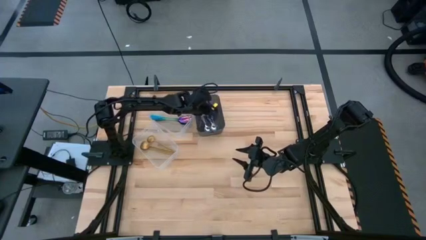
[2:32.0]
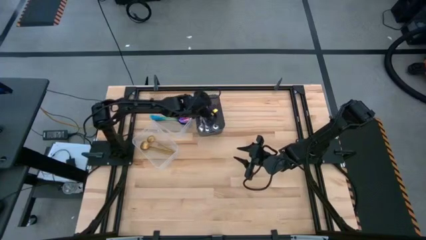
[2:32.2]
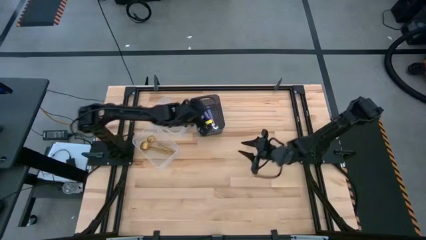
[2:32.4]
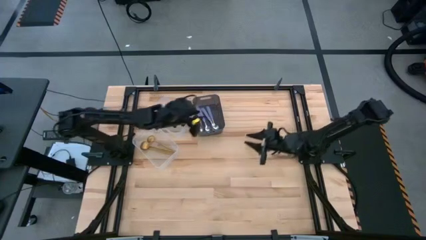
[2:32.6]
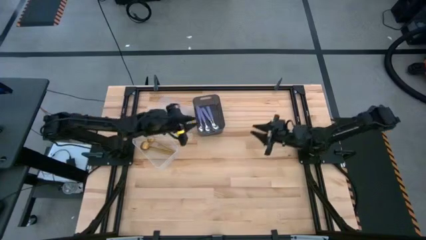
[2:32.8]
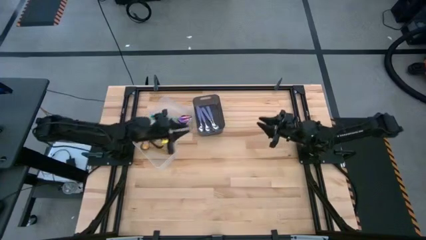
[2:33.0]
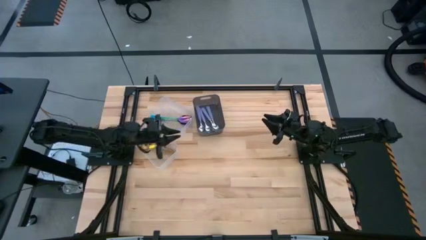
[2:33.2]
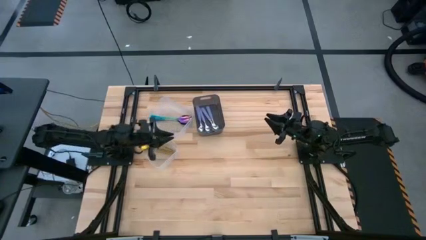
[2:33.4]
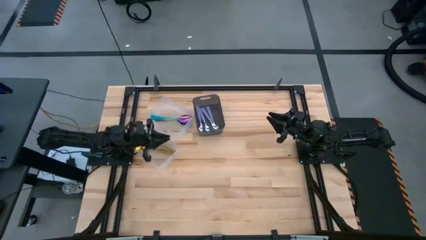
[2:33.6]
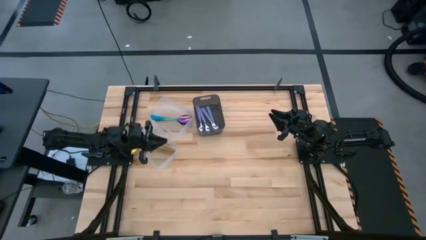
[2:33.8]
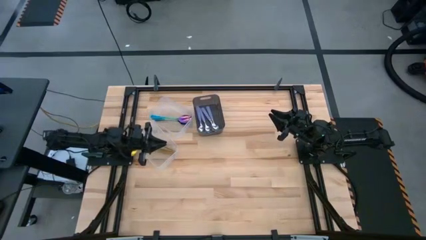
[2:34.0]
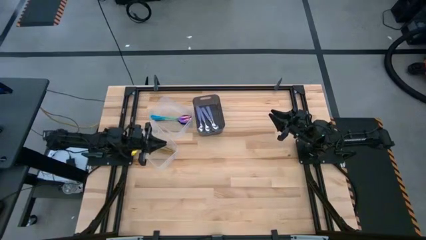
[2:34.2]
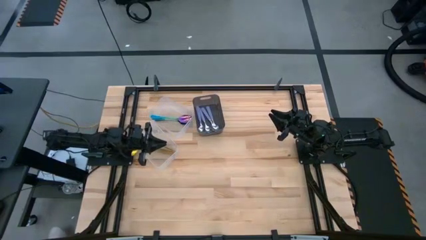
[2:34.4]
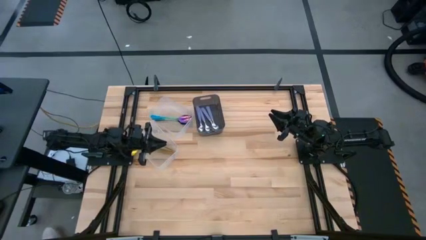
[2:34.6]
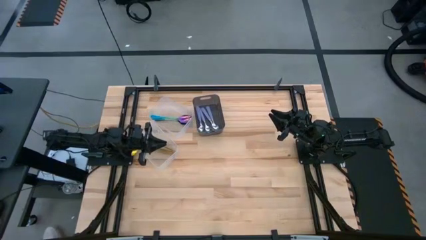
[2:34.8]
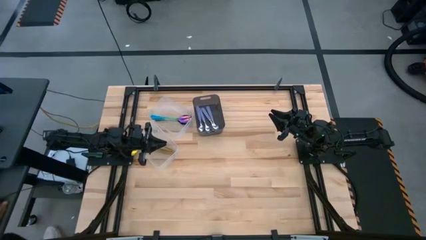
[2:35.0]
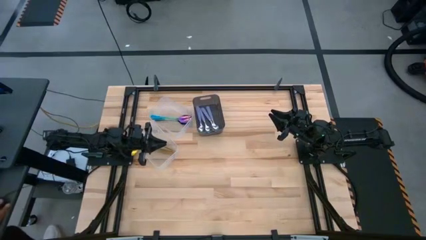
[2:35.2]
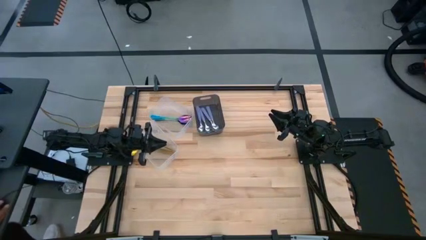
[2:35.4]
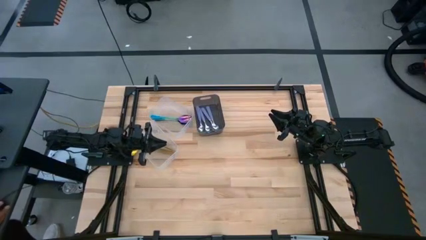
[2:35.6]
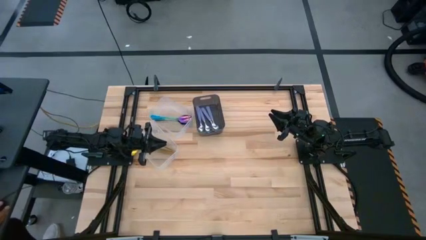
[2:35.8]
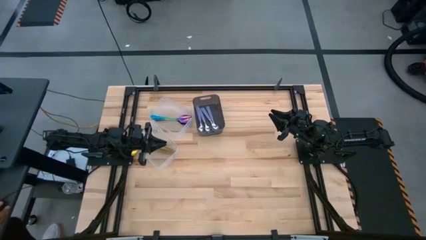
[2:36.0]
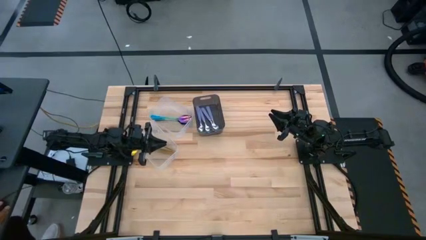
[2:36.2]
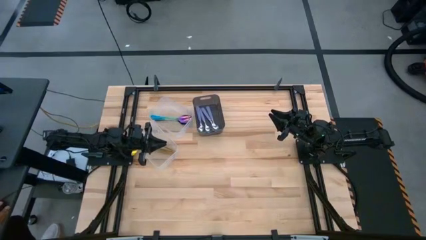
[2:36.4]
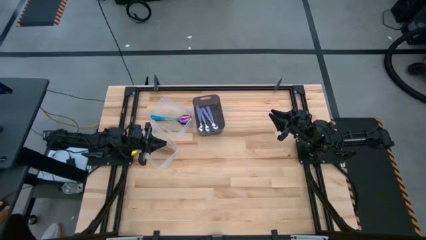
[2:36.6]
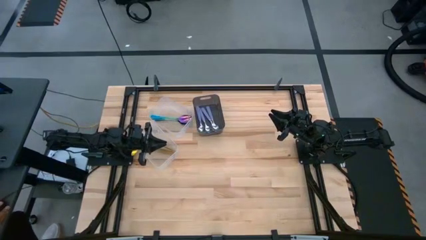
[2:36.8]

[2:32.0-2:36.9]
Task: Sort silverware by color (type)
Return to Home Position

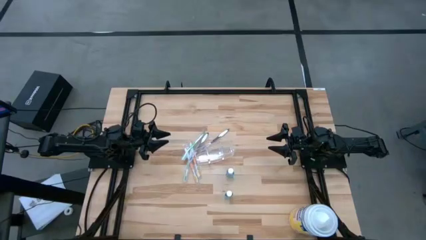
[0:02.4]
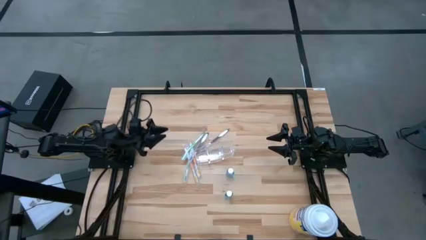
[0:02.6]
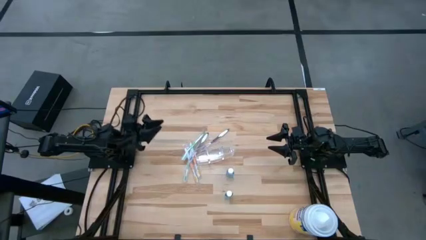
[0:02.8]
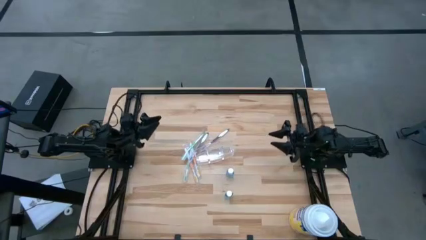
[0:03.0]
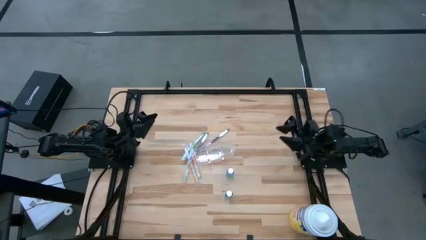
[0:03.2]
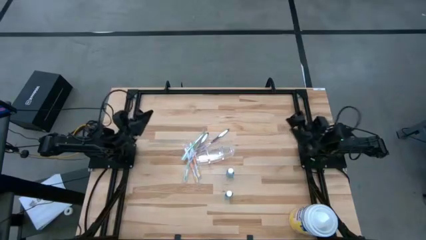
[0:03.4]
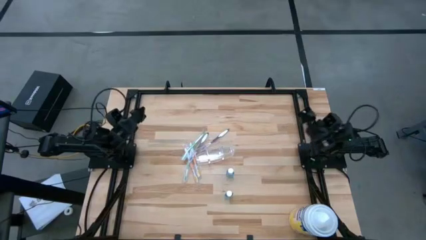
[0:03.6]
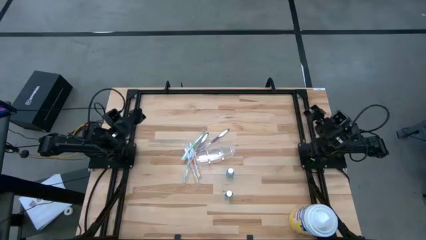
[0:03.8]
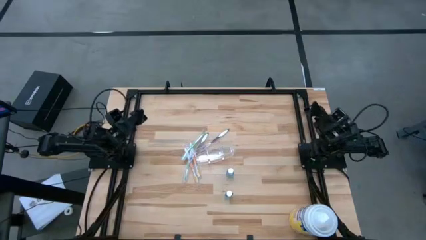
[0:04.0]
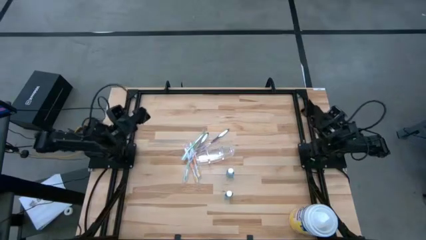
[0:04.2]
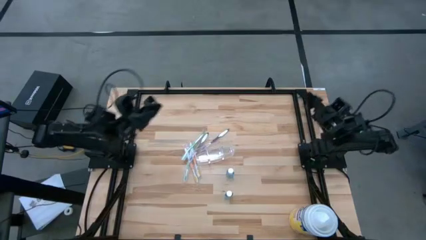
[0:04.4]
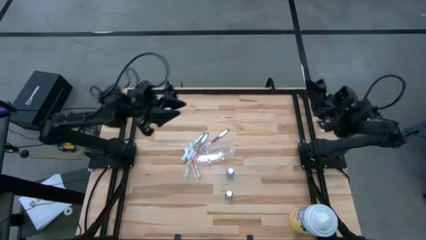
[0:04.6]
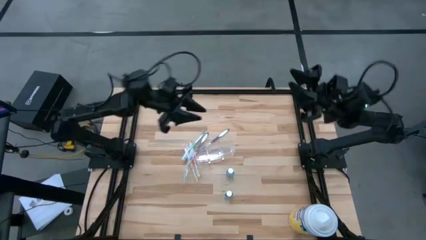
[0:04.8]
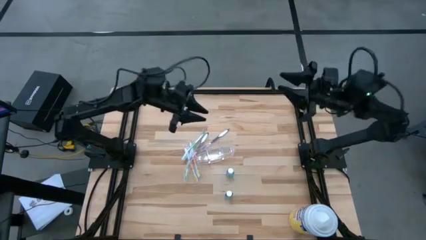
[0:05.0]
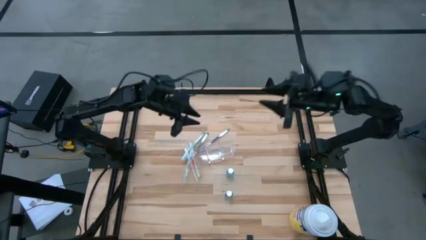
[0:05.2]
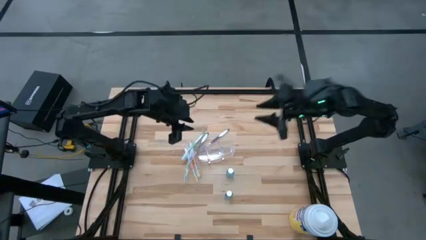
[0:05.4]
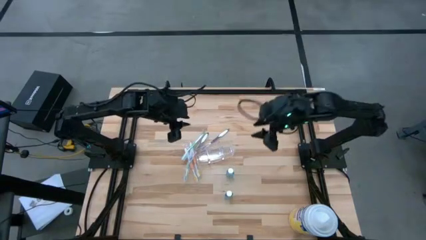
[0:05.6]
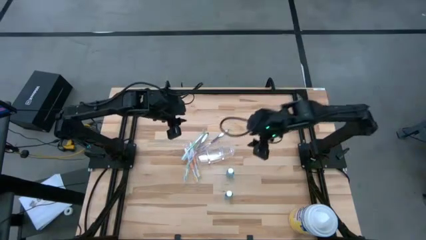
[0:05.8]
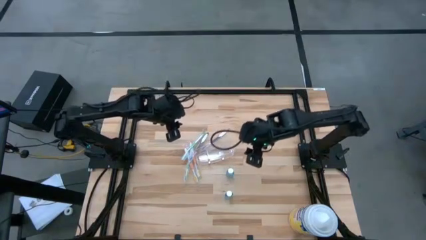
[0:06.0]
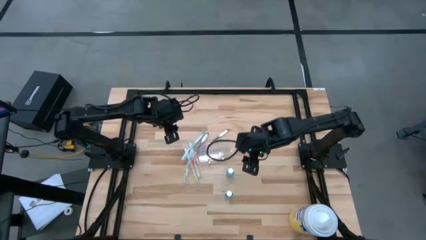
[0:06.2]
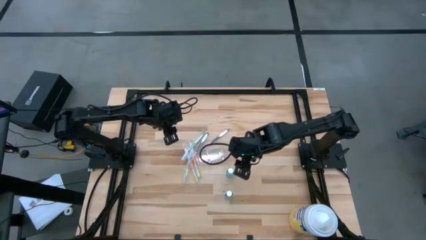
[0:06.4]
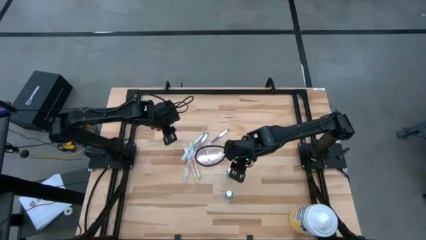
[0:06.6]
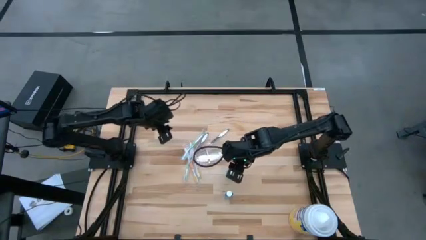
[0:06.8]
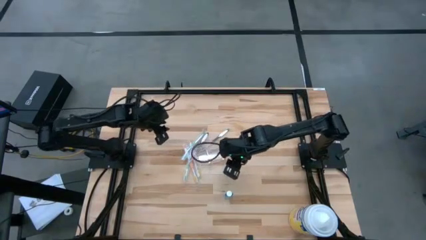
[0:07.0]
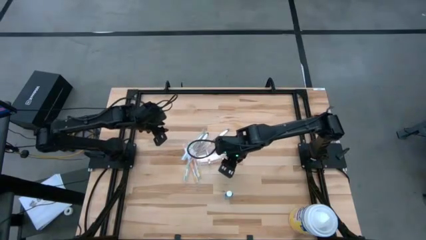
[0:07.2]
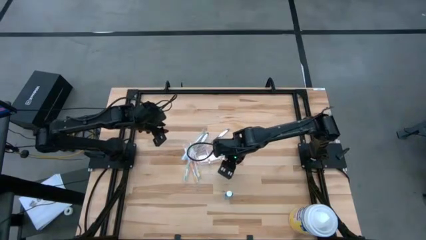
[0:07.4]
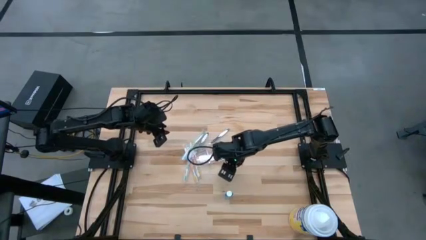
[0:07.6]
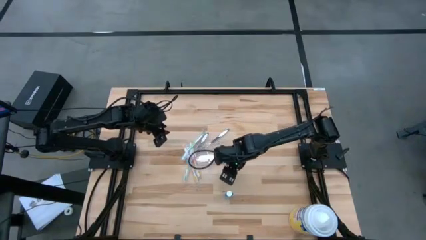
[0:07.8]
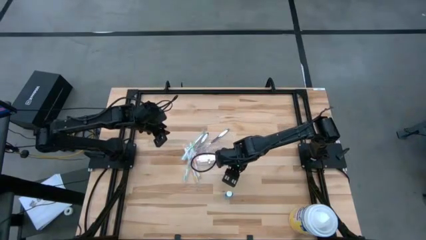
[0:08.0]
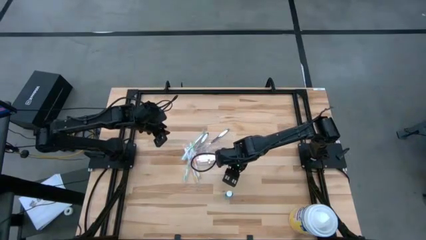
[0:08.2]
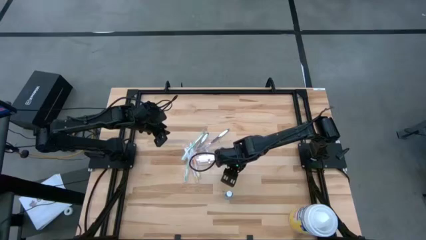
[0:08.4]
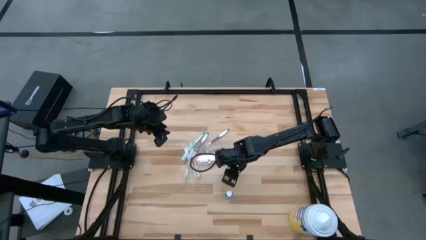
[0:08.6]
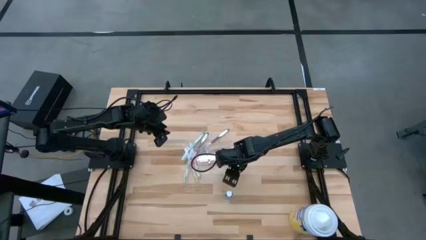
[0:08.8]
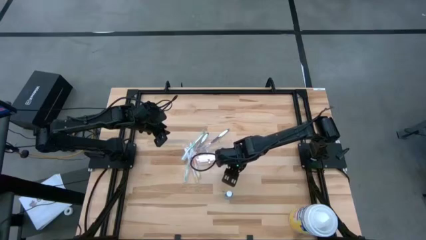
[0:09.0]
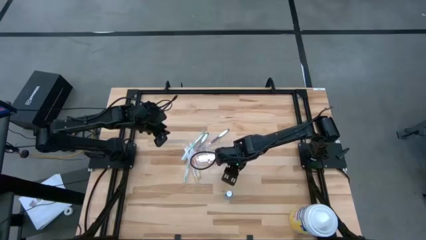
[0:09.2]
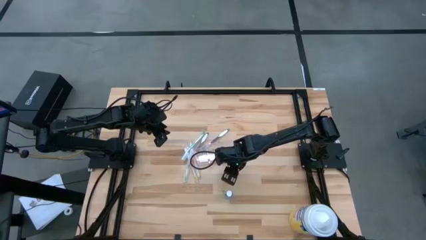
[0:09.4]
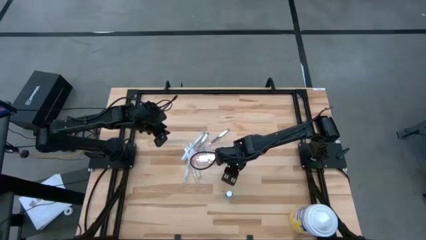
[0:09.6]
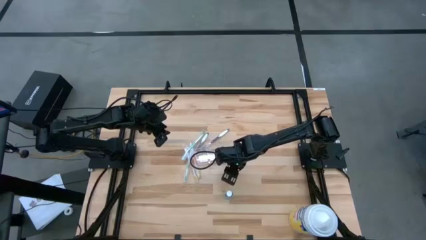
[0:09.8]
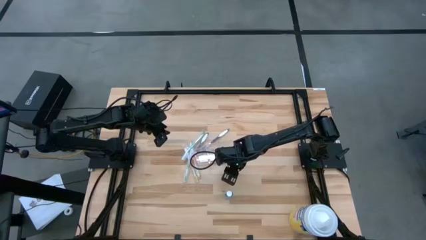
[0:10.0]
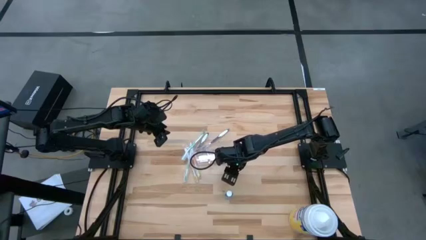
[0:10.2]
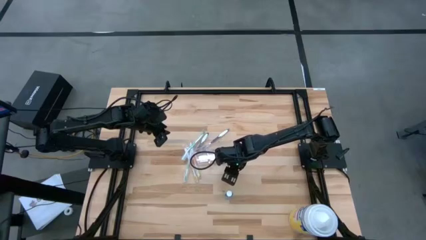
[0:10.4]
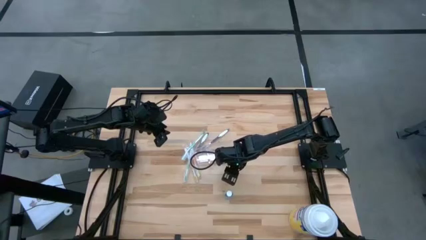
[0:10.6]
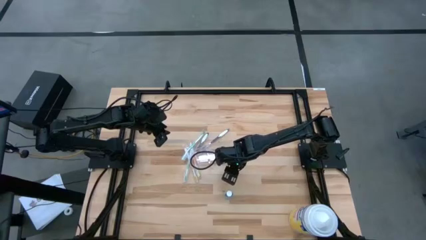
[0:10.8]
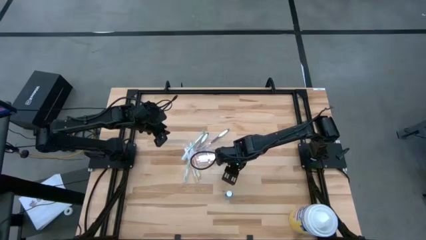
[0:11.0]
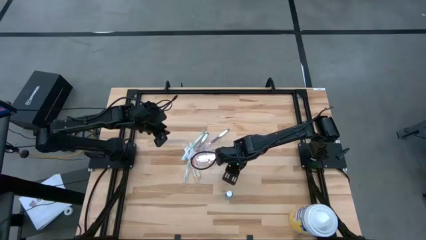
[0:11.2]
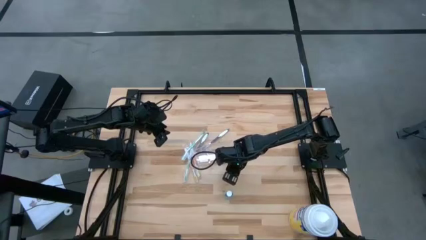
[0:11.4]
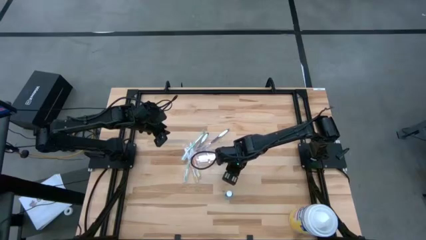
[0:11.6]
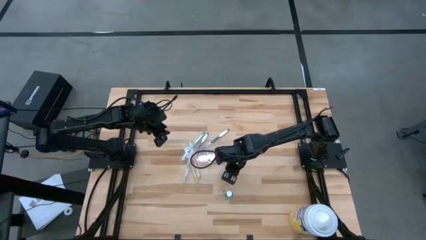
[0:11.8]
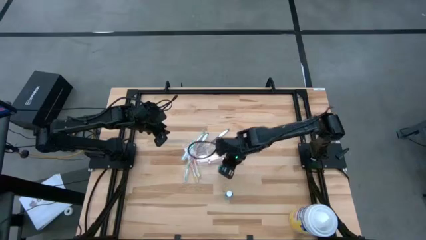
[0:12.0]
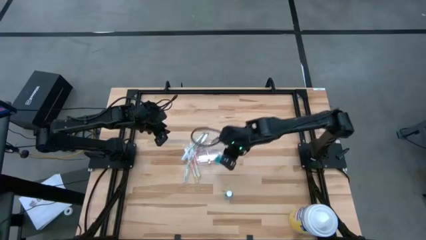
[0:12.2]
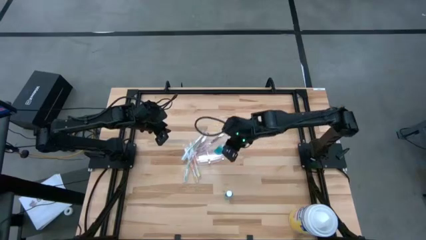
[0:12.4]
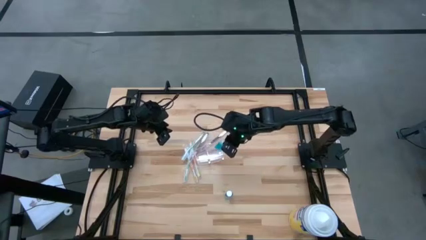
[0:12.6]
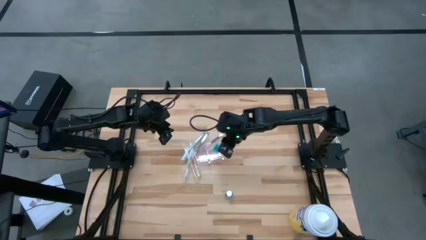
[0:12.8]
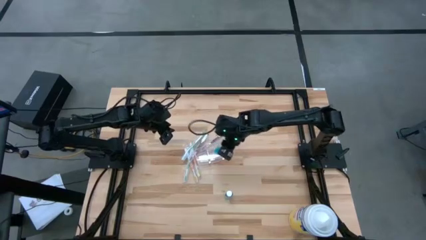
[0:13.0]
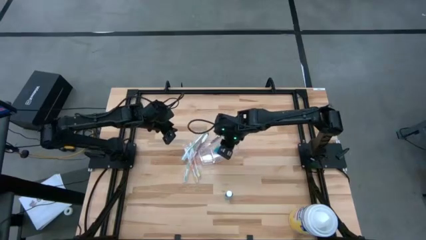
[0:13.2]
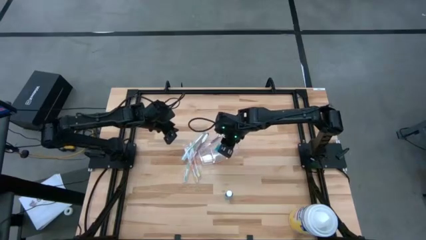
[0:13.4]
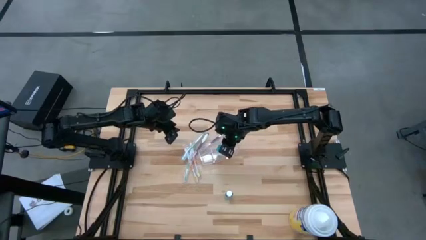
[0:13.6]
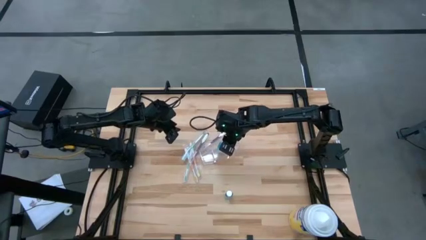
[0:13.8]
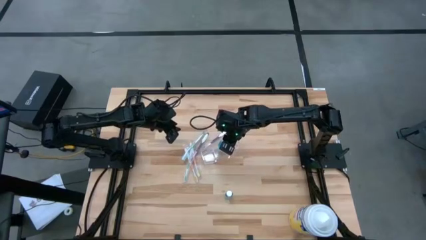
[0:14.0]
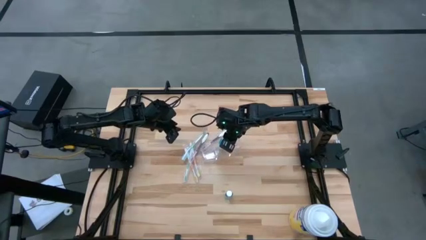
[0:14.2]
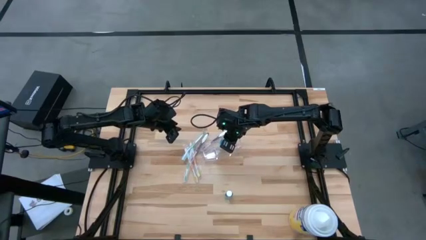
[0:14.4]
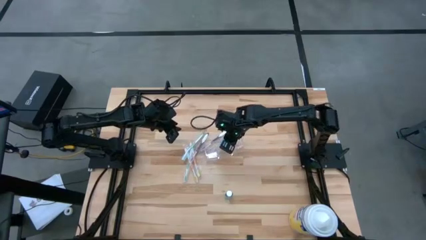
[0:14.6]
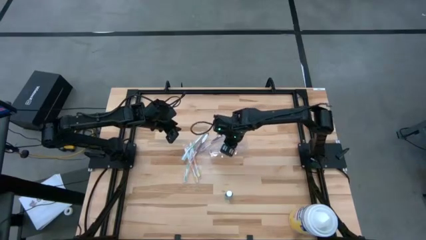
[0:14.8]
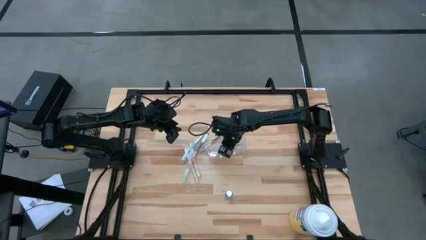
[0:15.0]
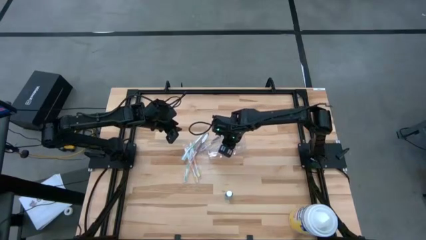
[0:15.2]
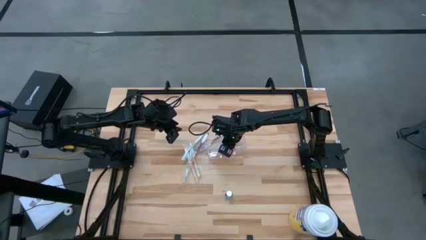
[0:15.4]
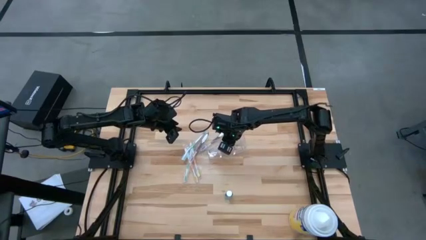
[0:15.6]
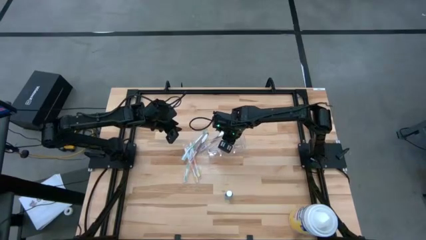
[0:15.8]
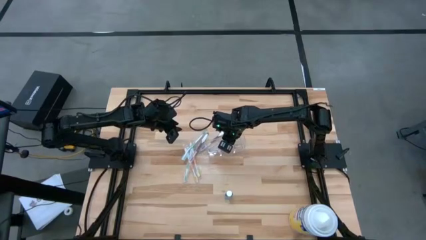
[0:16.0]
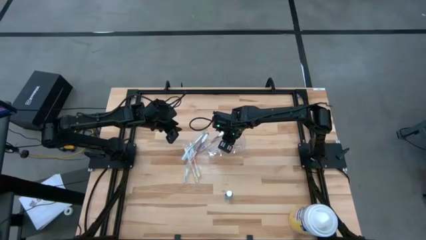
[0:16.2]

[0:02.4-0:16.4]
Task: Pick & Place toothbrushing station
Put the blue mouthwash bottle into the transparent organizer
